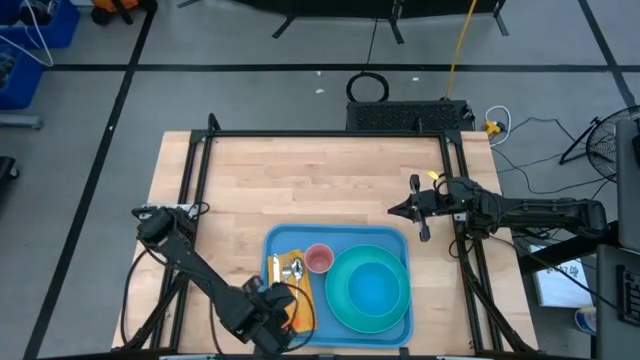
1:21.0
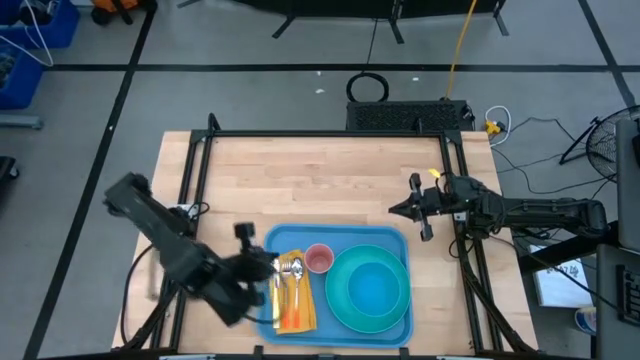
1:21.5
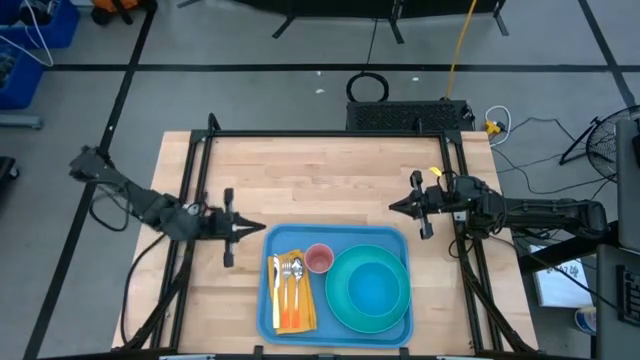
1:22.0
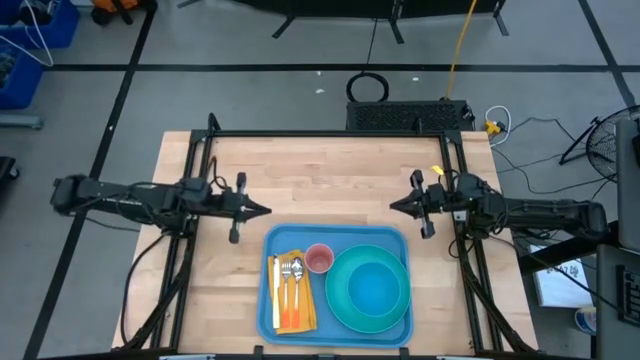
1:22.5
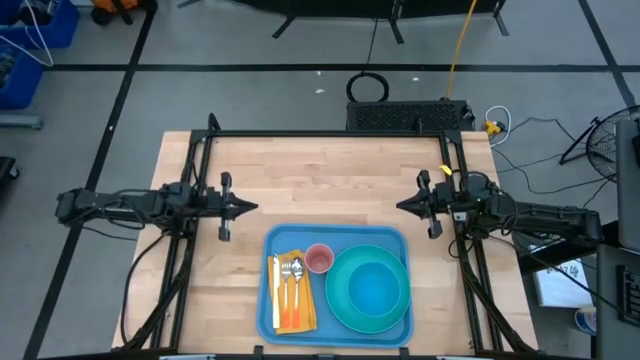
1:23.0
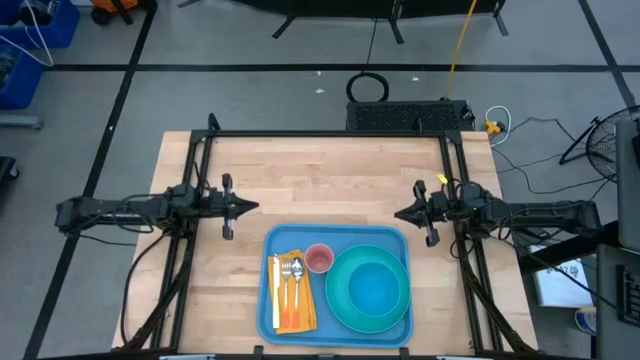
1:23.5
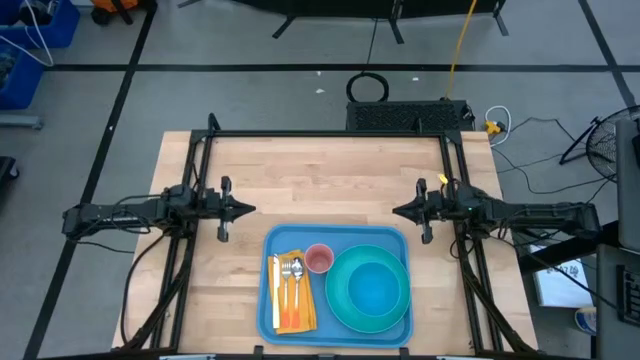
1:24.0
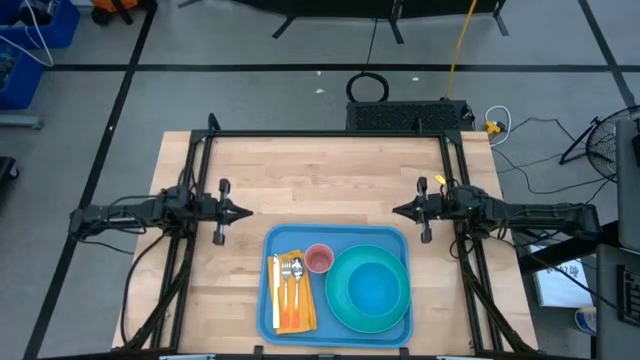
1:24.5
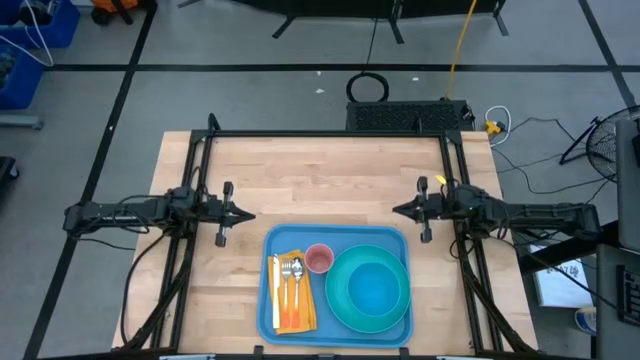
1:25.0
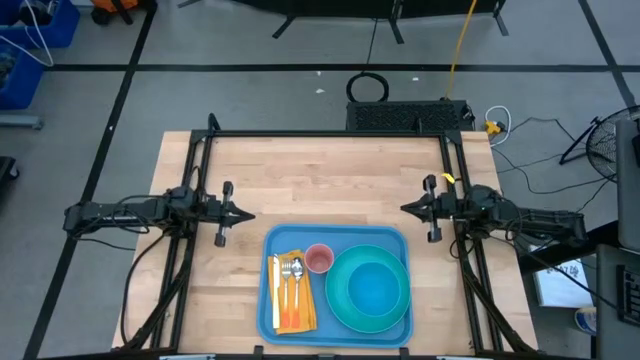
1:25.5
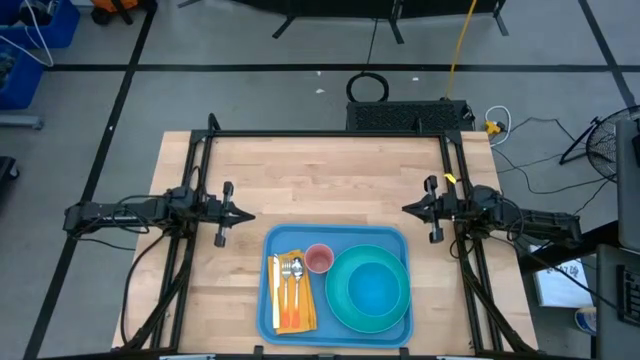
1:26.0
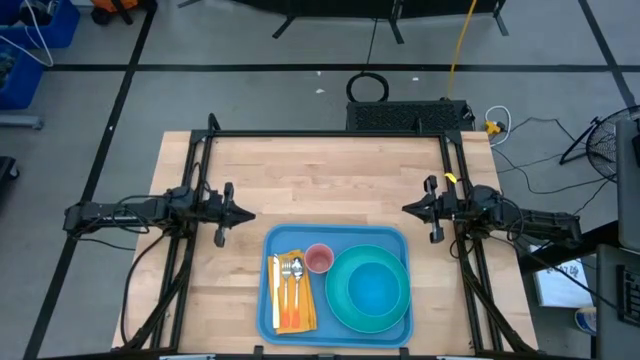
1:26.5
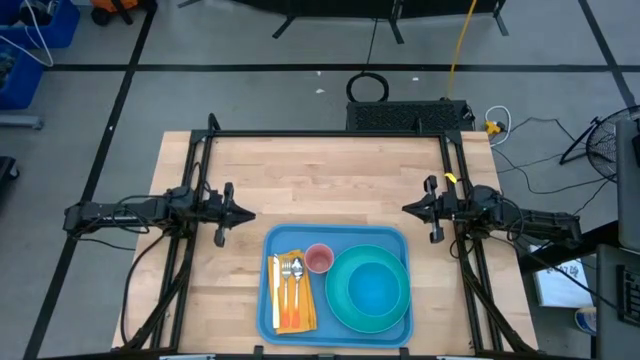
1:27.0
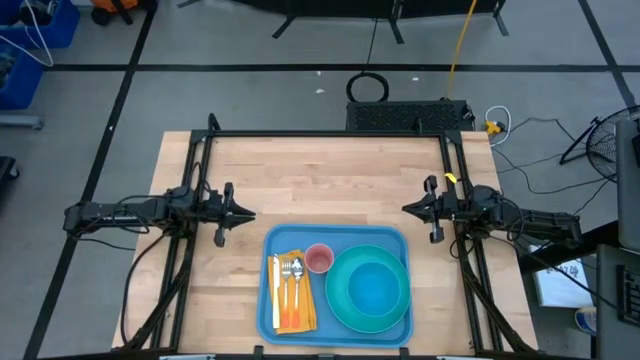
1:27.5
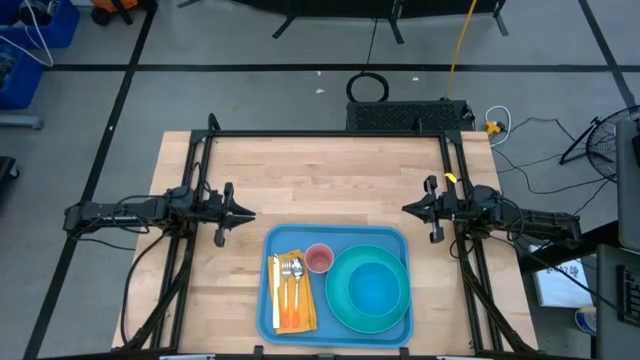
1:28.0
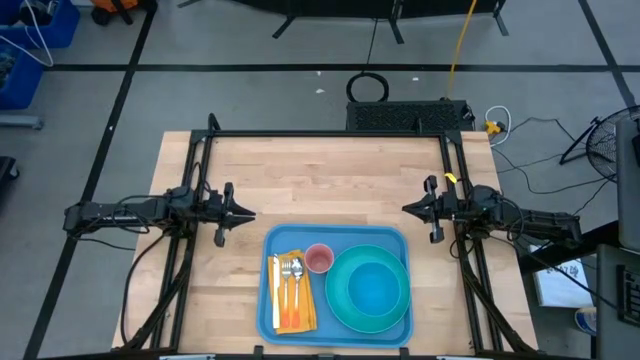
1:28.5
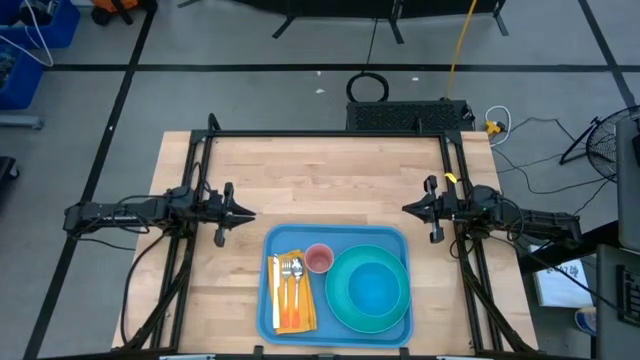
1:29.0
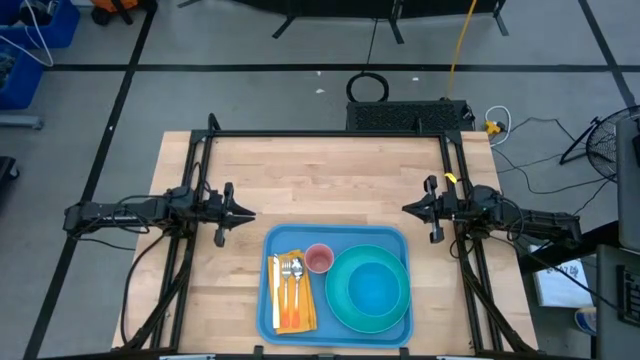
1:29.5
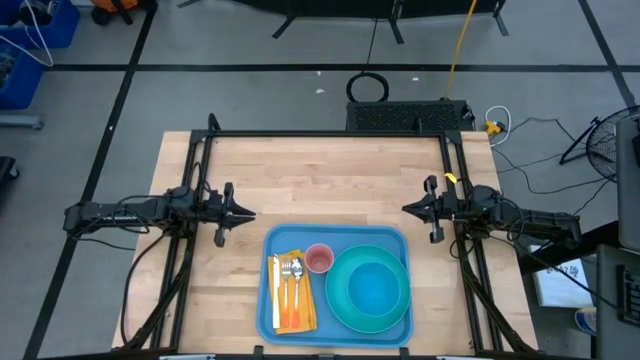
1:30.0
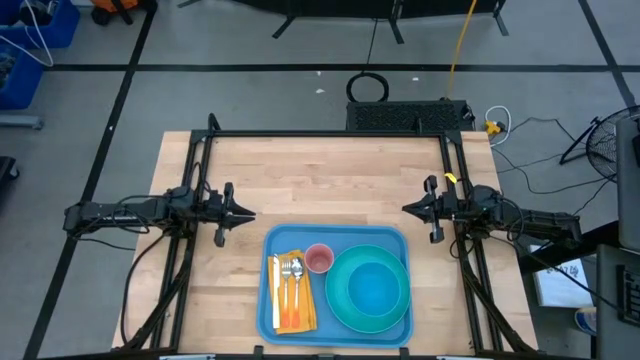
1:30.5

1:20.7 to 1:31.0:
Task: Set up tray
Return to Home Position

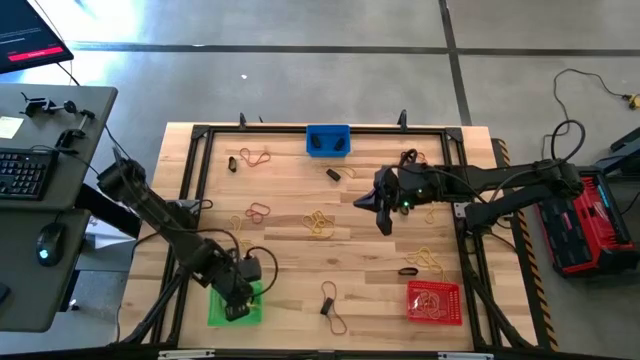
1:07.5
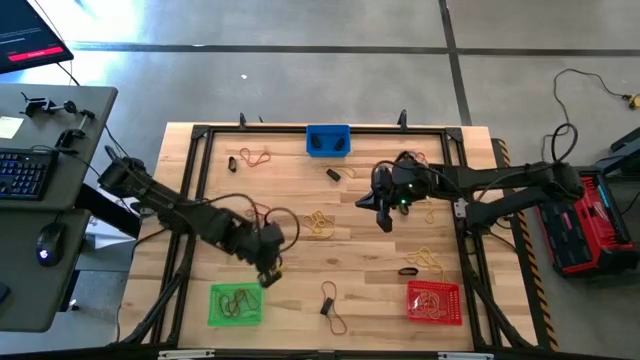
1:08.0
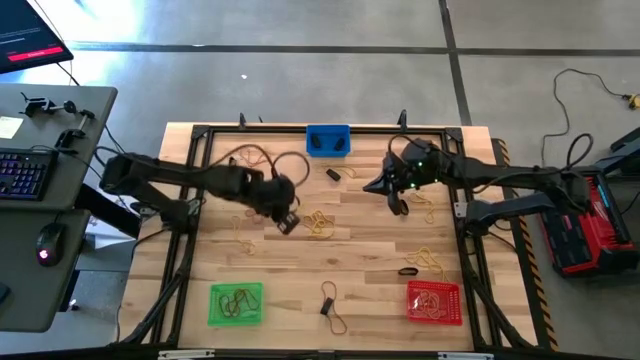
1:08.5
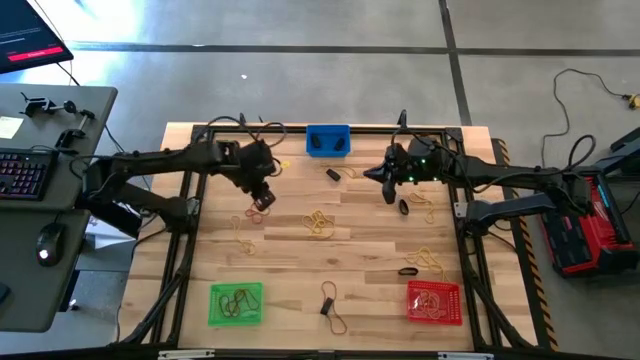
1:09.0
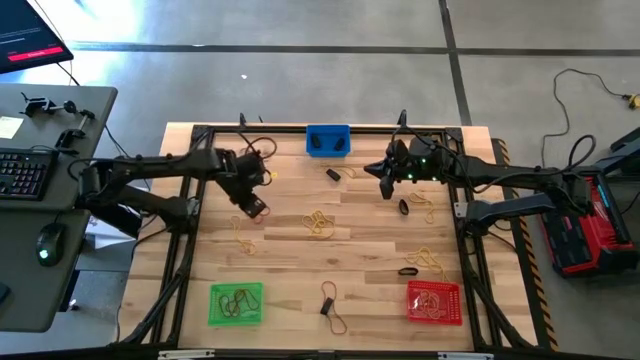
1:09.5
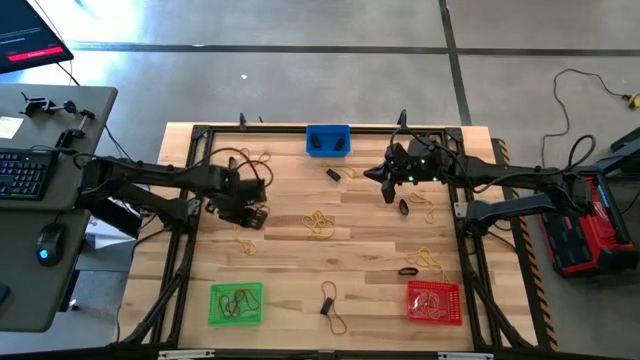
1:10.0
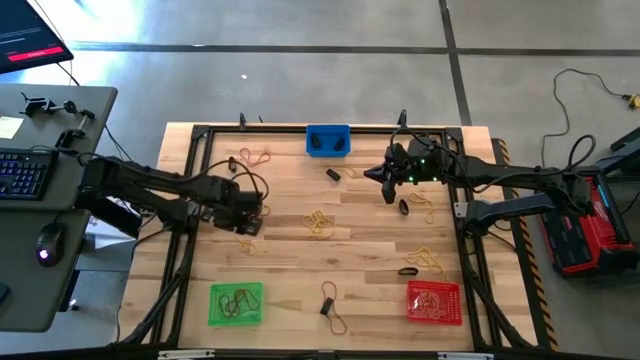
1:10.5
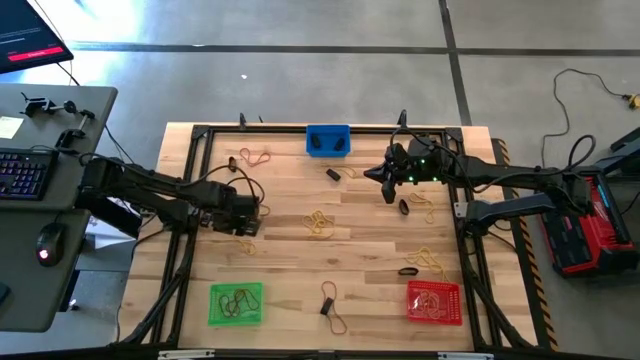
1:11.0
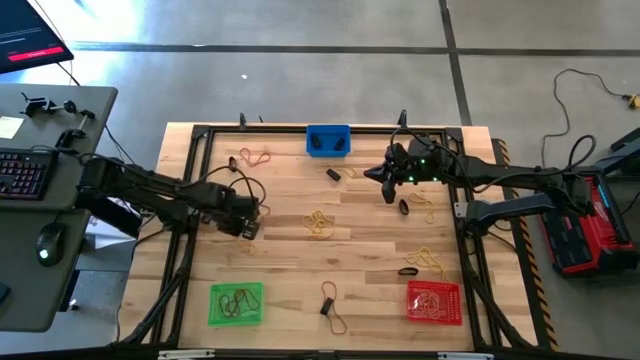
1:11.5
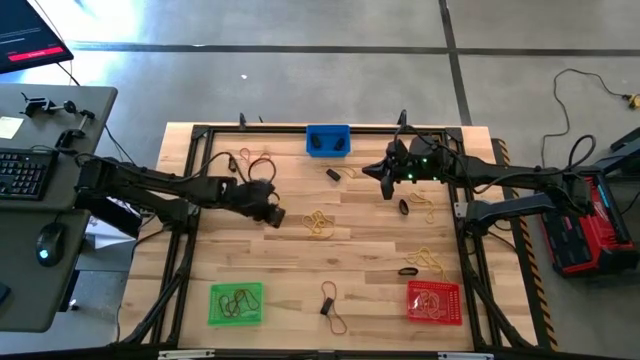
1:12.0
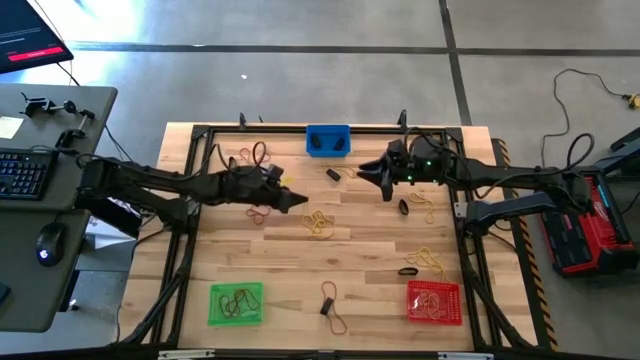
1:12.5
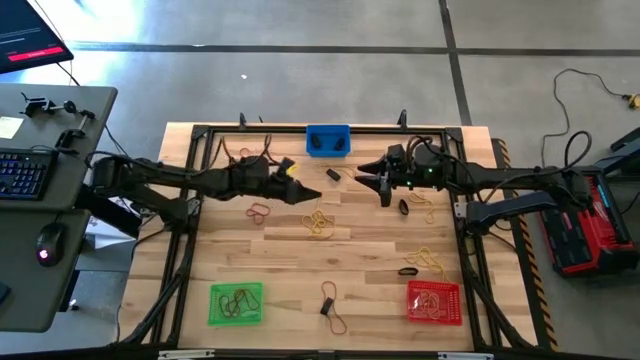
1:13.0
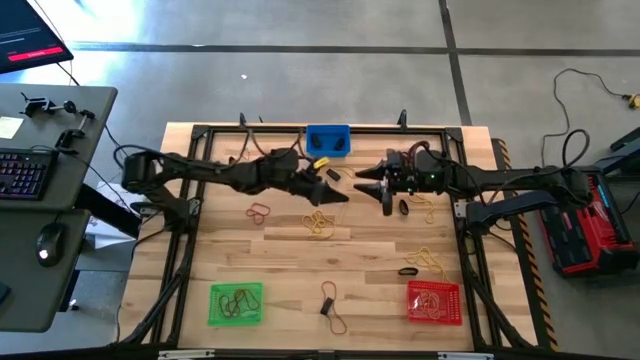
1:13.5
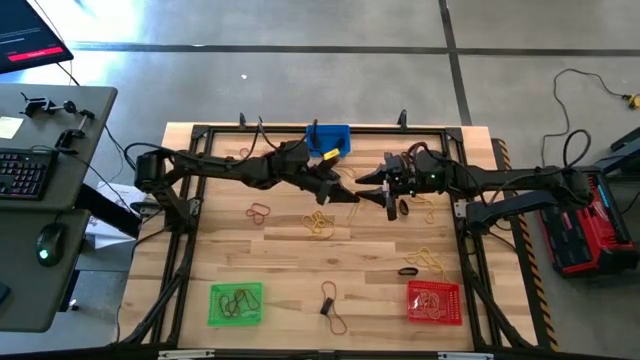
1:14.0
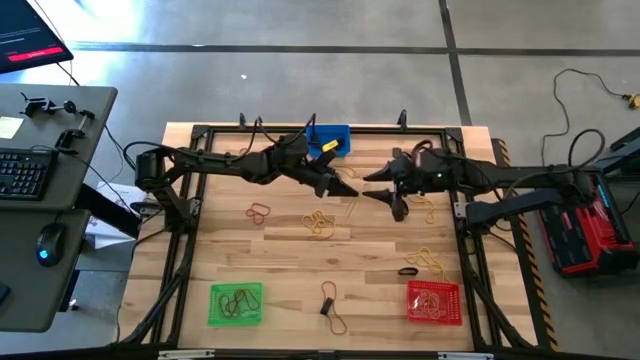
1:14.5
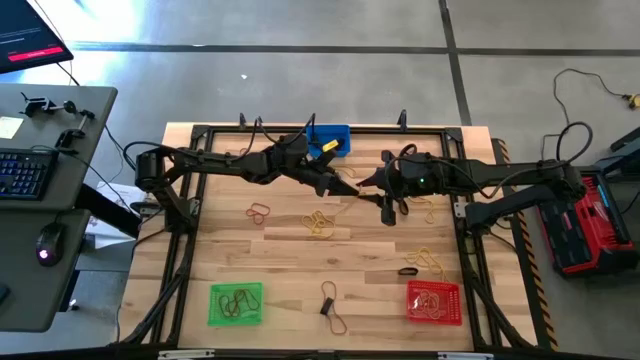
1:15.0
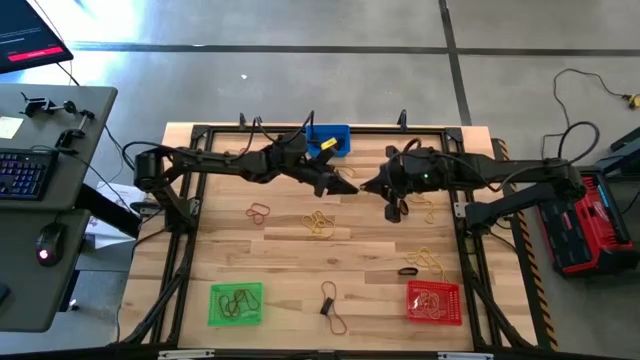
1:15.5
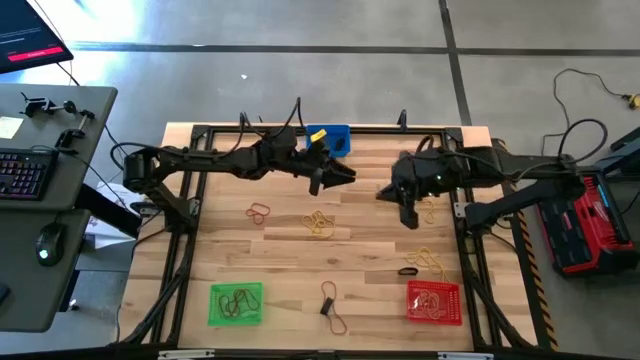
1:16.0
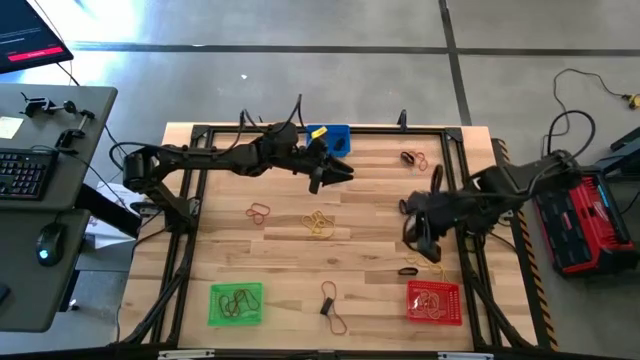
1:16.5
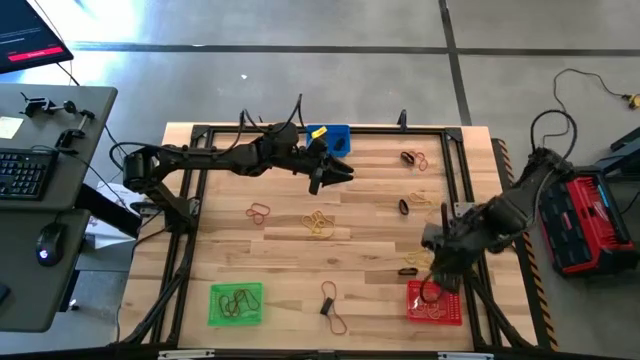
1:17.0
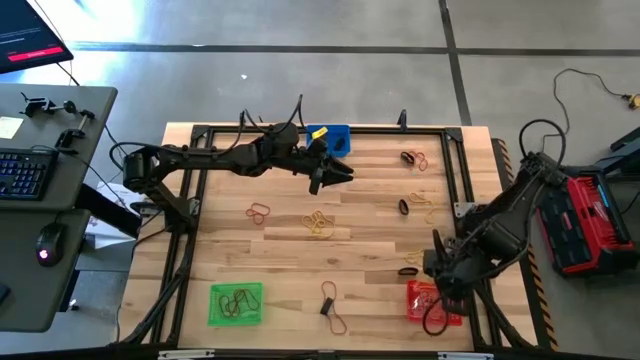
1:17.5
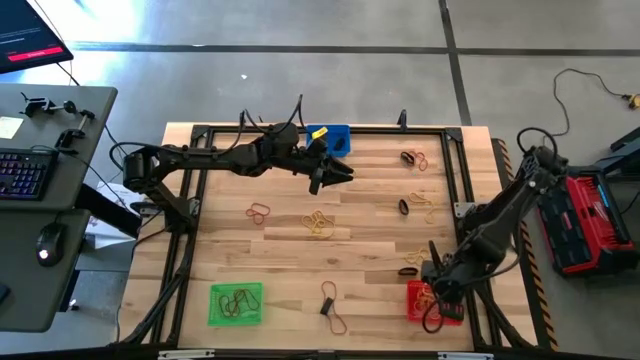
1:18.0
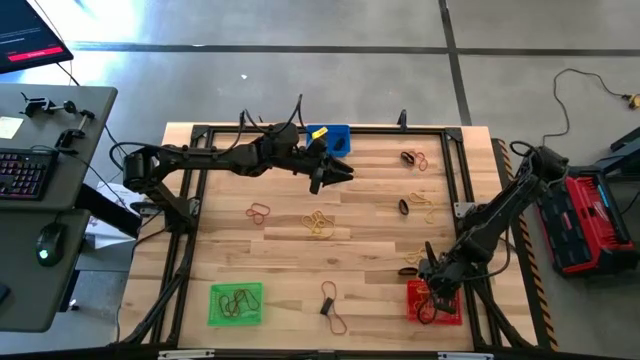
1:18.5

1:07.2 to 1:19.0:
Task: Sort rubber bands into baskets
Put the yellow rubber band into the red basket
